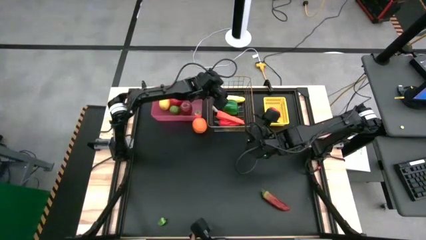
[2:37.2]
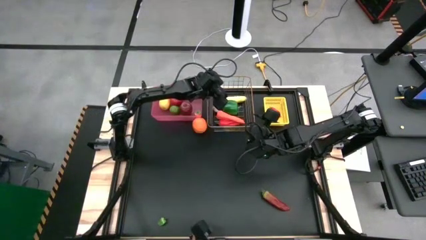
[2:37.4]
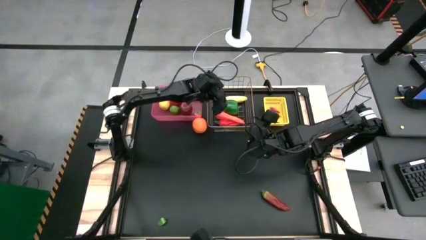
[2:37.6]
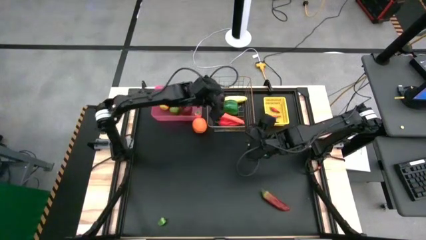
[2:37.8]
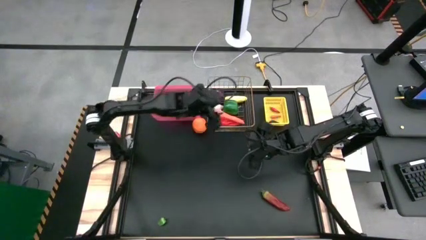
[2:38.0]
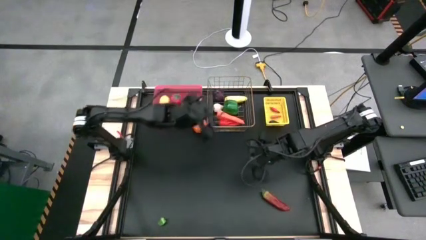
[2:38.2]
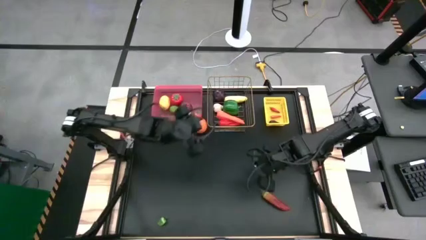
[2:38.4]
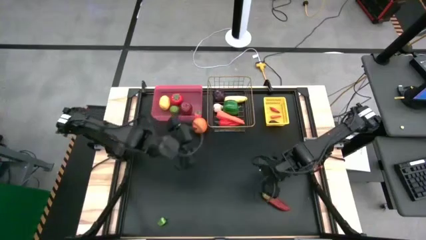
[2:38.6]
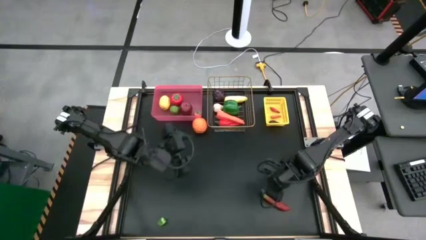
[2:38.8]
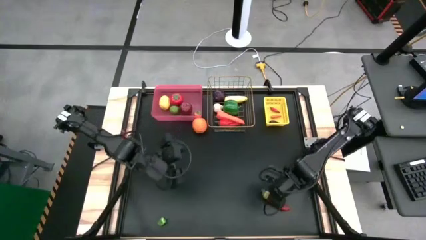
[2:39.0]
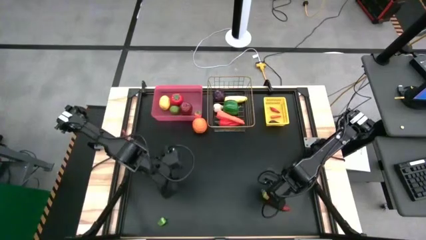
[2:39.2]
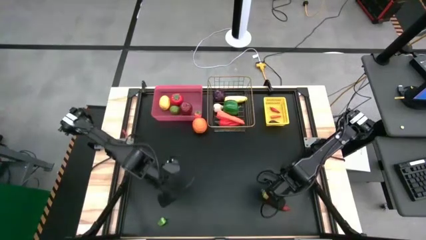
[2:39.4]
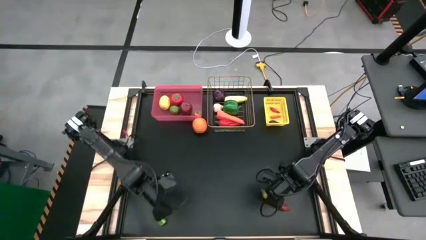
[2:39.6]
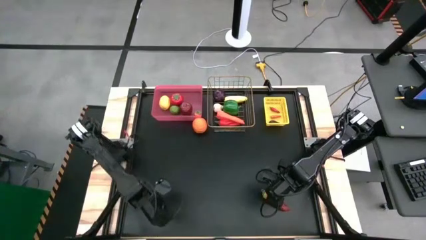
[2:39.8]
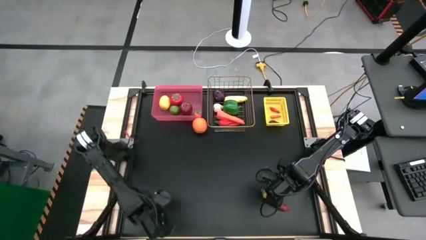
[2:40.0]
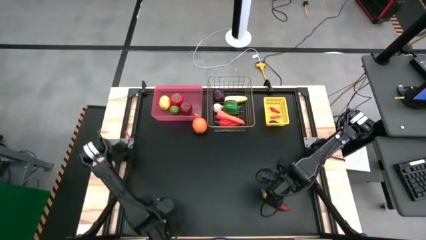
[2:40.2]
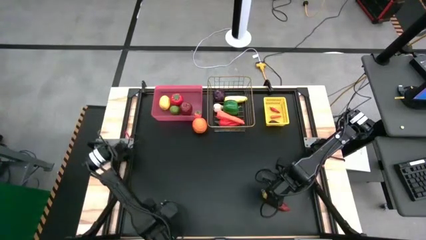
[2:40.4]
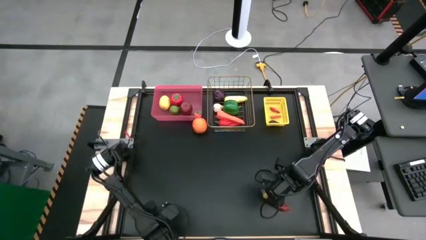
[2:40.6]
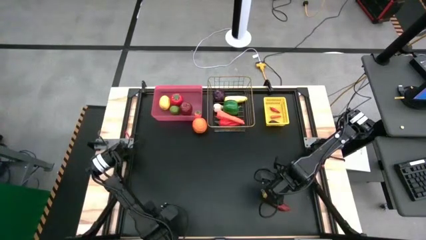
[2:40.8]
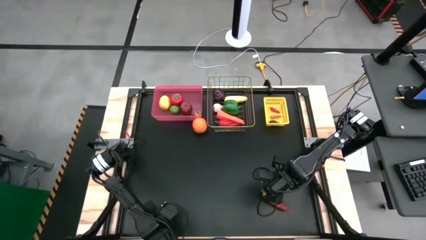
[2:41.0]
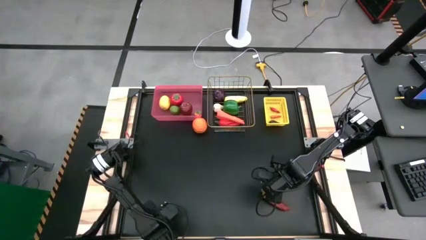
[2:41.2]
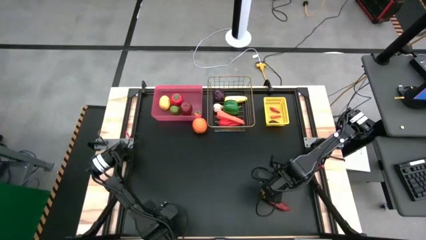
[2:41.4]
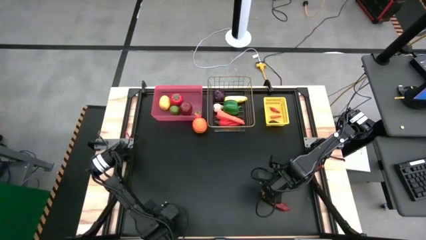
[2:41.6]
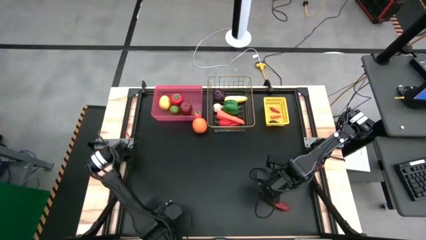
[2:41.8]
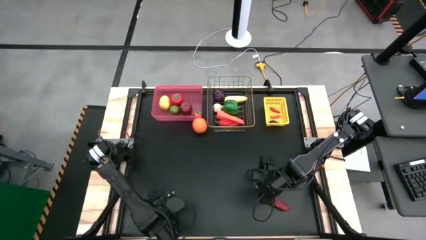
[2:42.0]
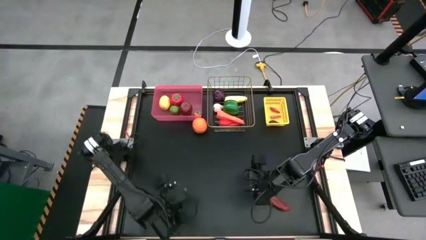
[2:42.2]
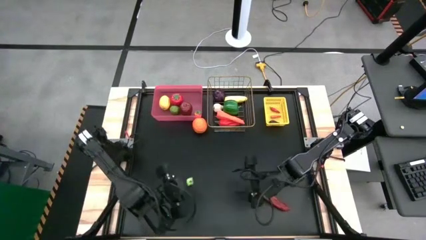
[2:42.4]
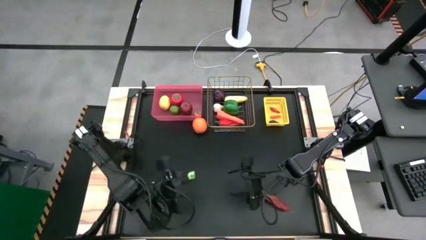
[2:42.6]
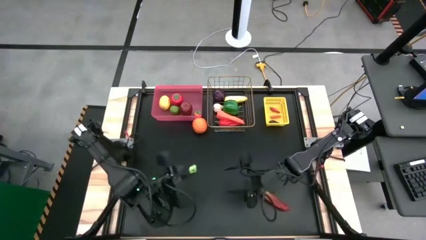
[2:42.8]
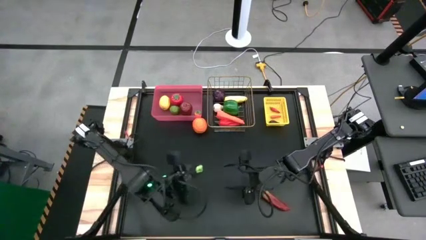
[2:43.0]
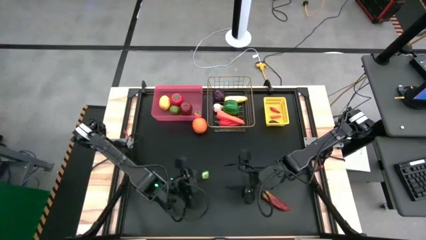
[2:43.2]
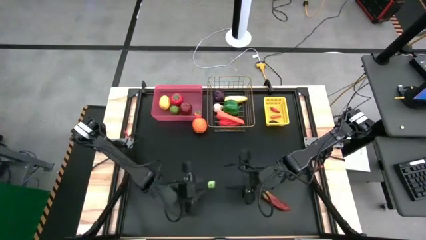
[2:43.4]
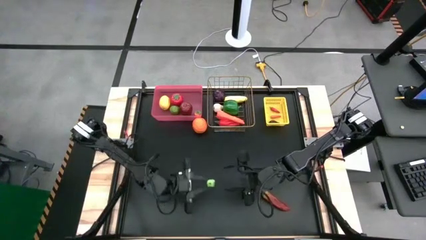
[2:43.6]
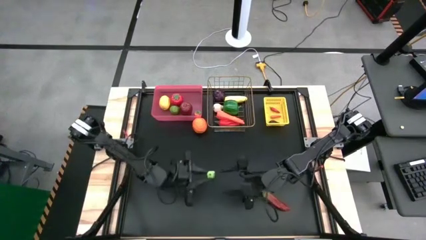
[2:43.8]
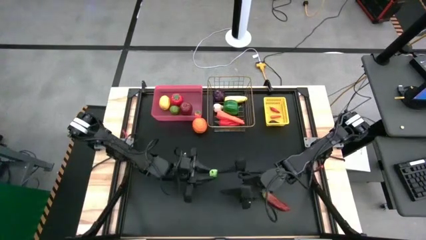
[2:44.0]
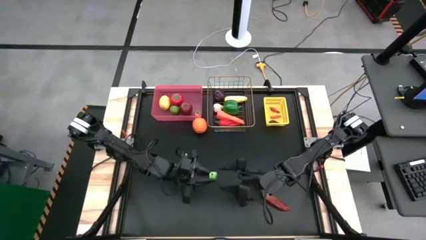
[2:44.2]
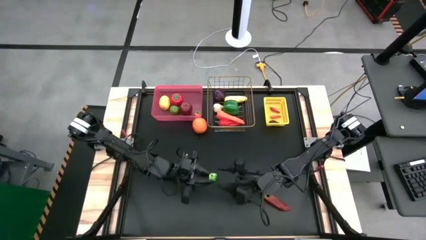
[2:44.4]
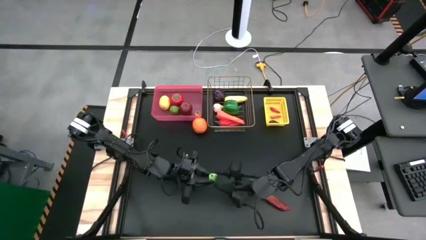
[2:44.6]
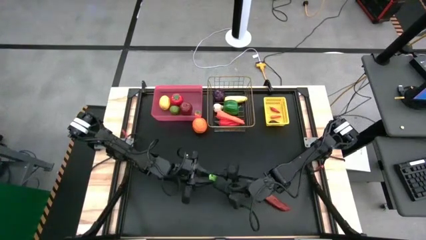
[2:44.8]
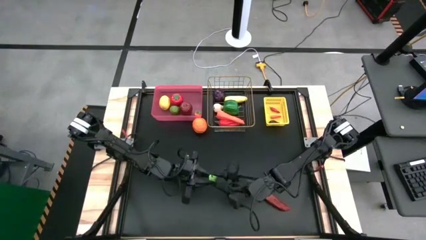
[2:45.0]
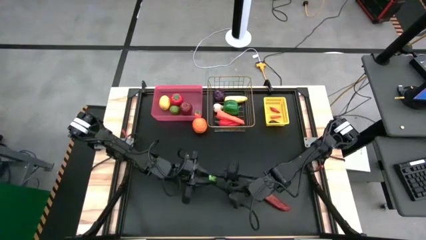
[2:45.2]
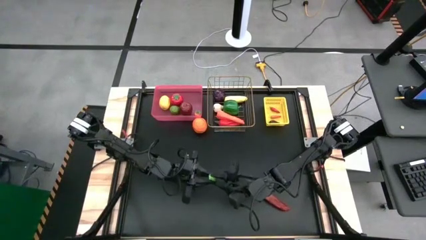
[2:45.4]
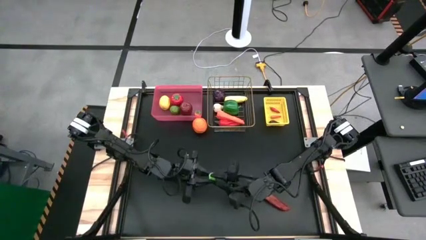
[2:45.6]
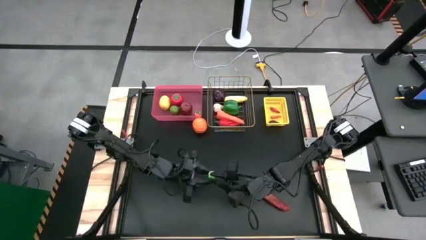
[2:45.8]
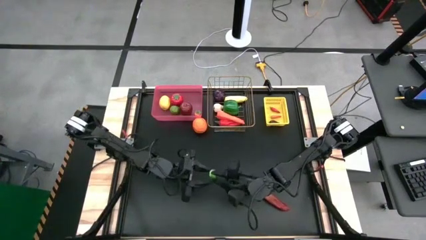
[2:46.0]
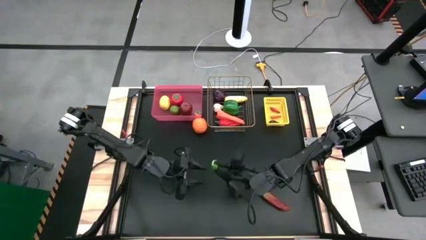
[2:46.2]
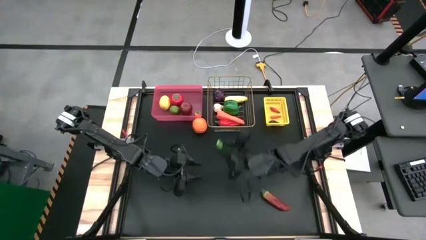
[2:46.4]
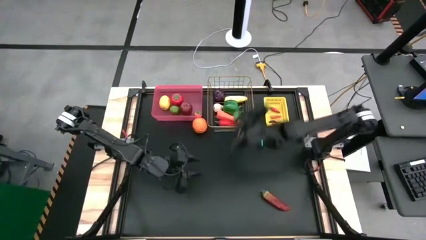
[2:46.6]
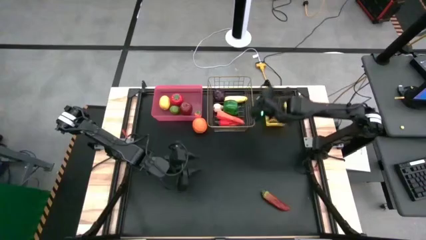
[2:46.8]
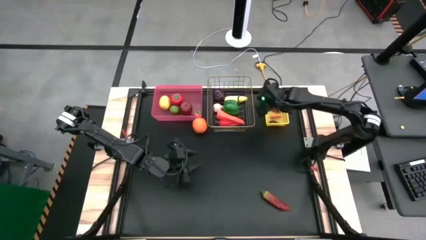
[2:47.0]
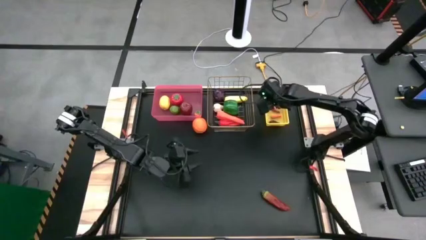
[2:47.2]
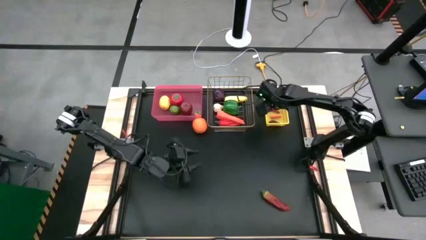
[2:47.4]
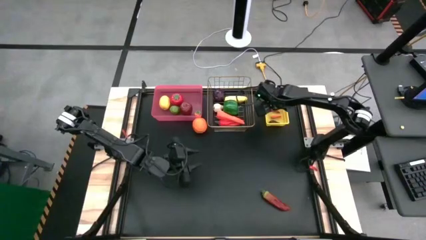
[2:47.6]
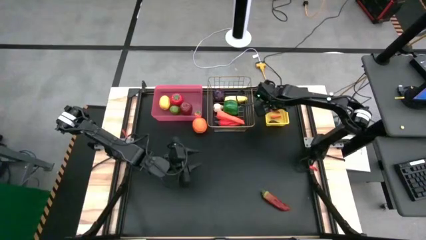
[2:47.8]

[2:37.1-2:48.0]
Task: Sort produce into baskets
Put the small green chili pepper into the yellow bin

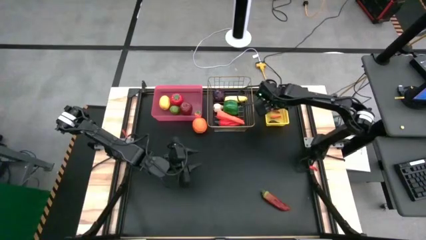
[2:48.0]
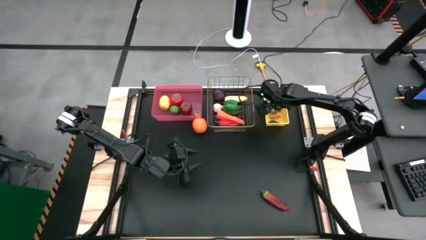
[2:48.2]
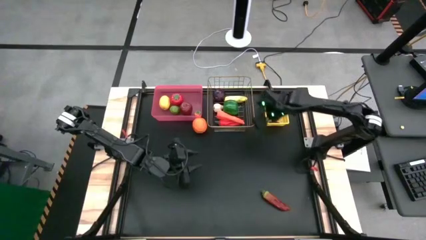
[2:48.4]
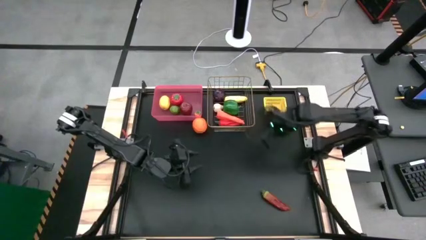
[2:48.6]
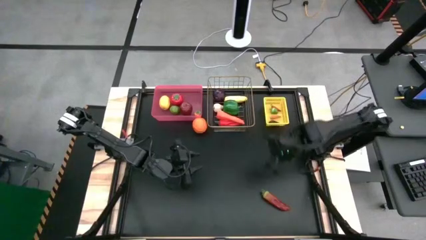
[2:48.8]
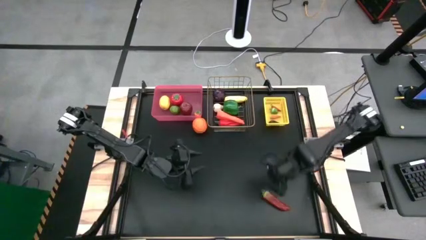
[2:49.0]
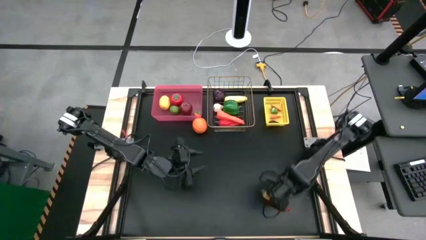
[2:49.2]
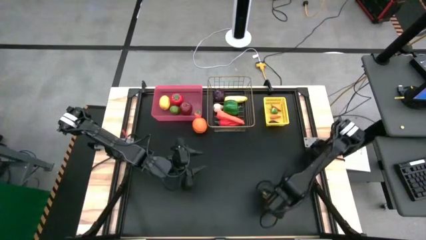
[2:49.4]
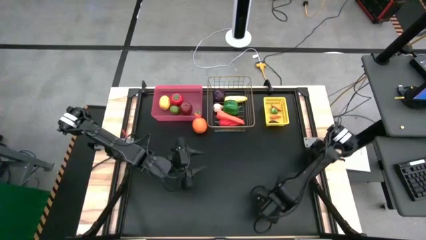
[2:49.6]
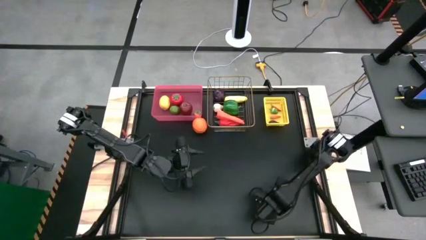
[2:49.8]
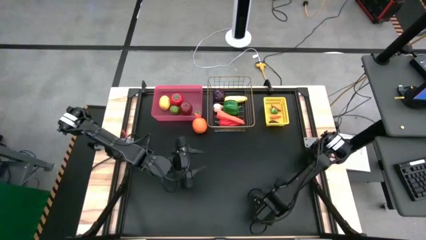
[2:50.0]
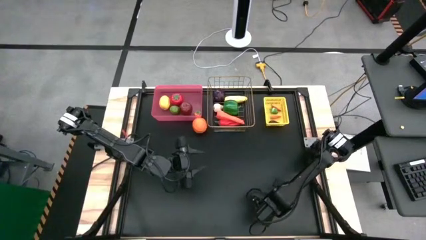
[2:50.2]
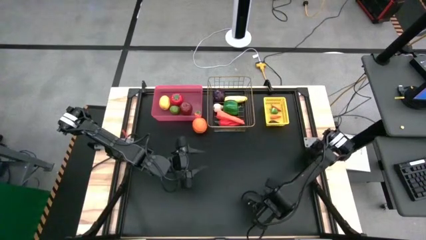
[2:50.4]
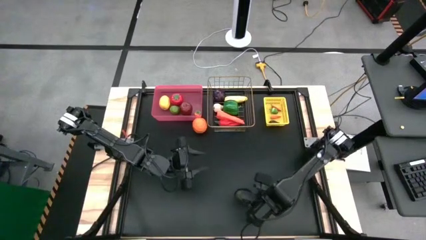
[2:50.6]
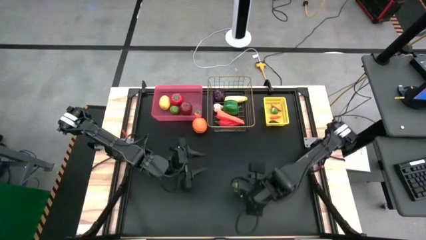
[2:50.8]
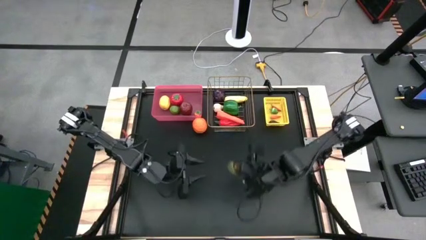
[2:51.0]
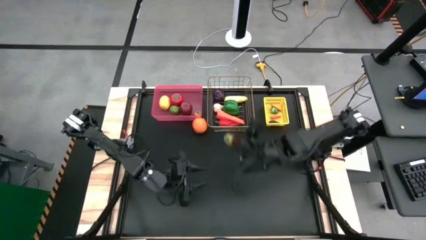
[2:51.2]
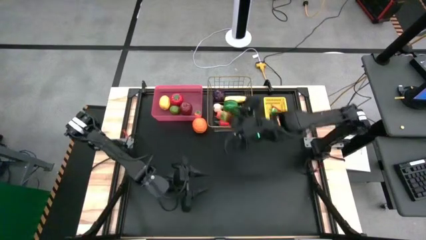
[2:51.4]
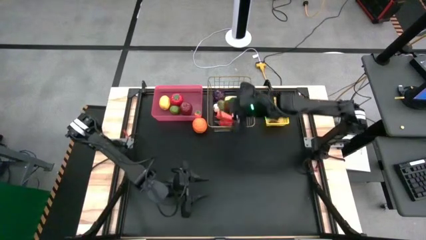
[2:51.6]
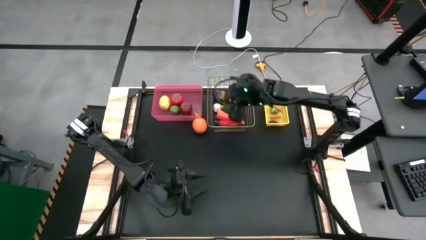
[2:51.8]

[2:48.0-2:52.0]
Put the big red chili pepper into the gold mesh basket

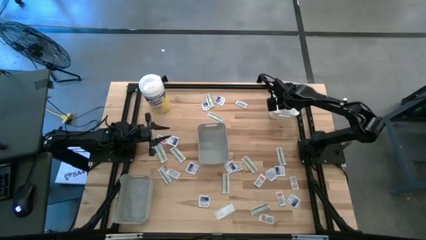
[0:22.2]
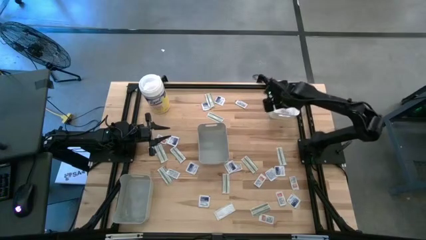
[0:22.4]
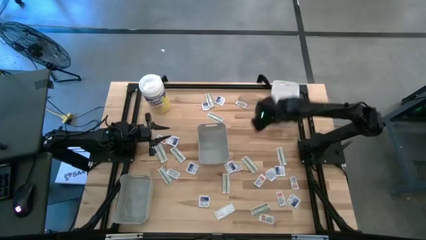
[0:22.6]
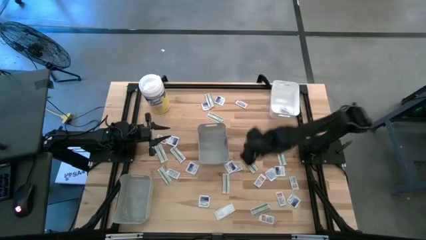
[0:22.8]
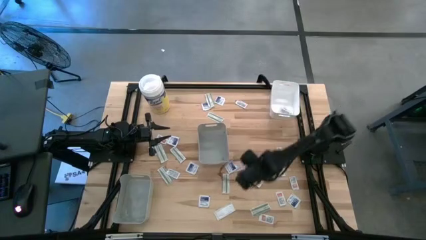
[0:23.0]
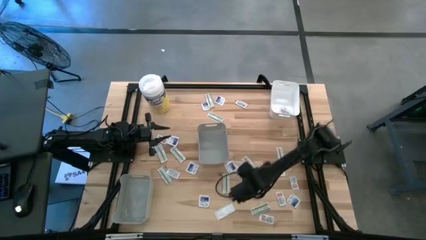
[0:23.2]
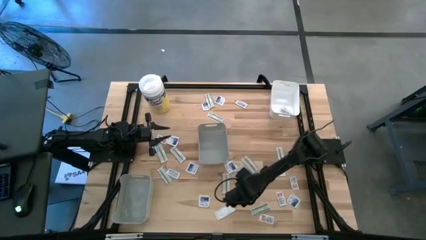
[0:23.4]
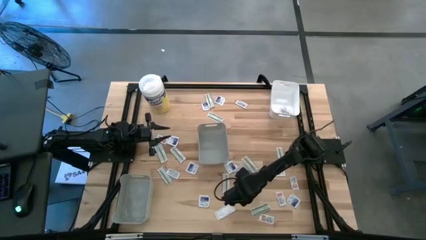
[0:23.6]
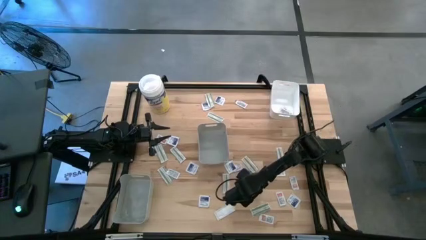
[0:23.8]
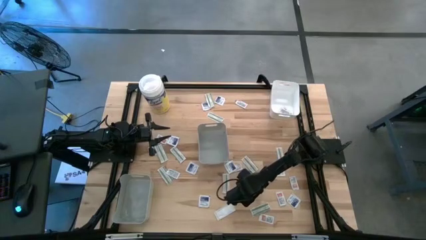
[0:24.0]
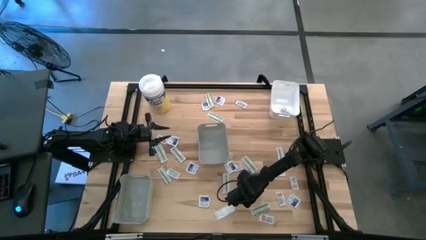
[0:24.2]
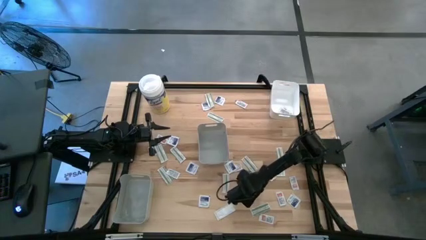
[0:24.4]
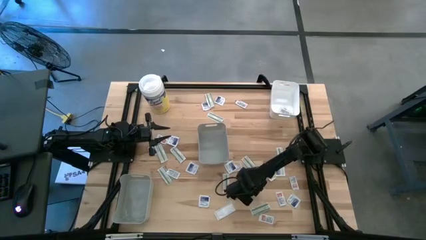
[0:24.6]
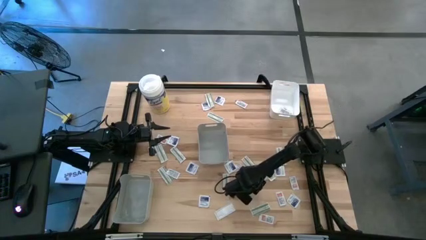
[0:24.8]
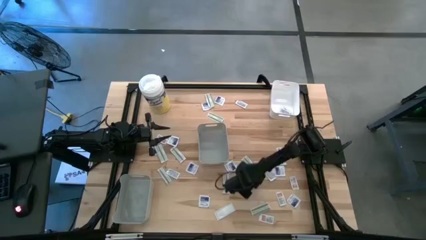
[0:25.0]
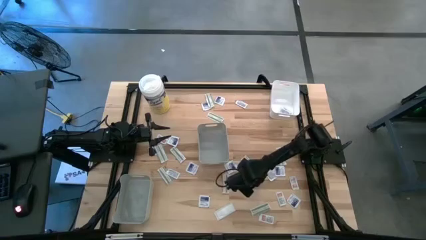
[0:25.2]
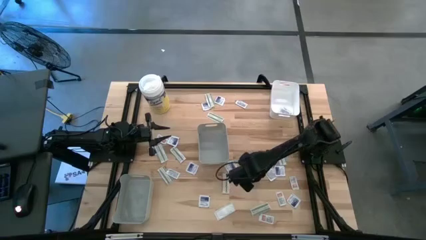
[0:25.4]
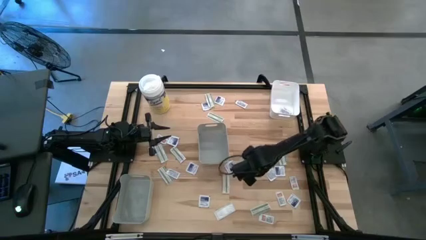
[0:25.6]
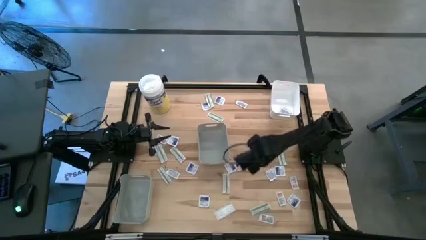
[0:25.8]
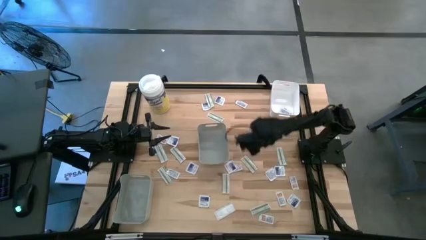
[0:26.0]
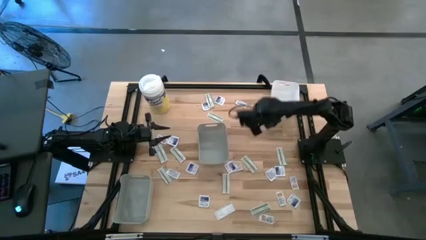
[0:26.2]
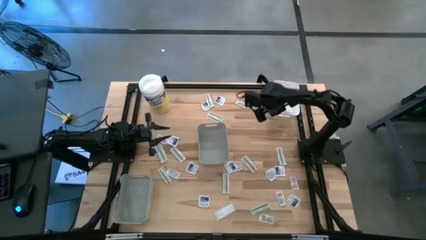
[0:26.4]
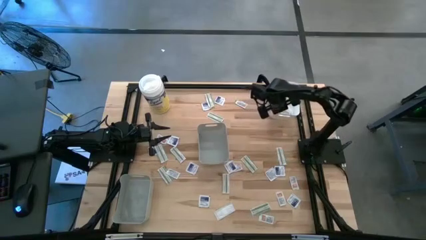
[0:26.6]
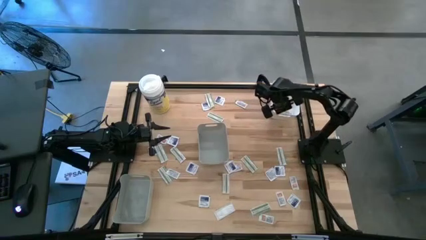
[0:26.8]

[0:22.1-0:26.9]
Task: Pick & Place First Aid Supplies
Put the orange pad into the white bin
